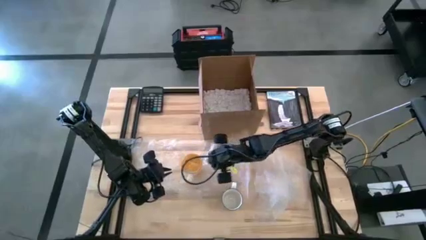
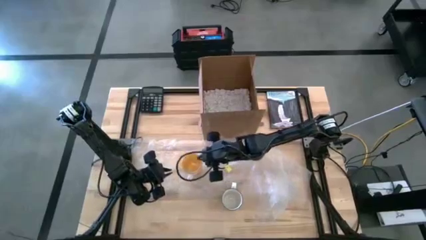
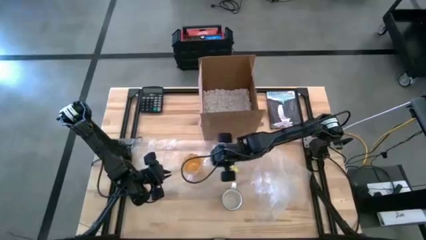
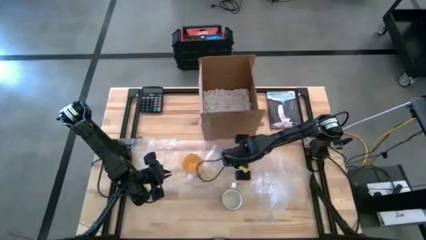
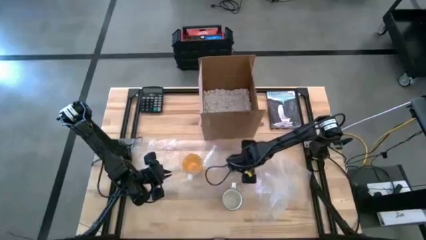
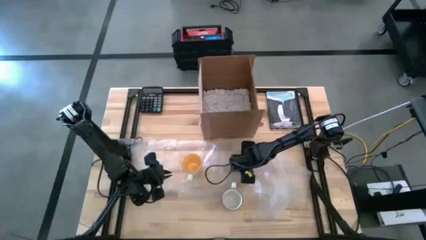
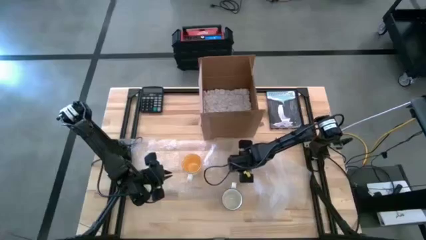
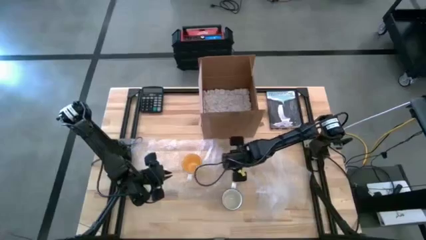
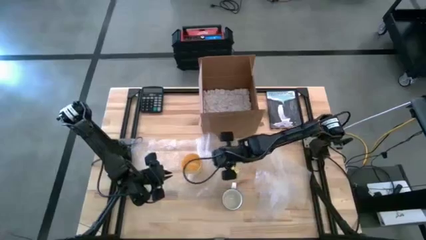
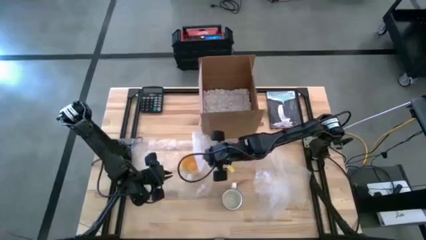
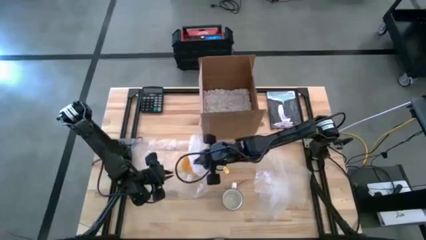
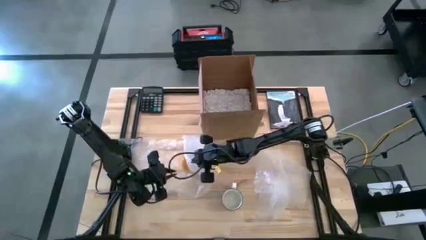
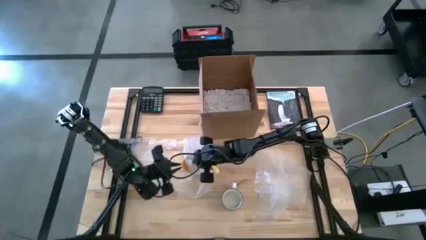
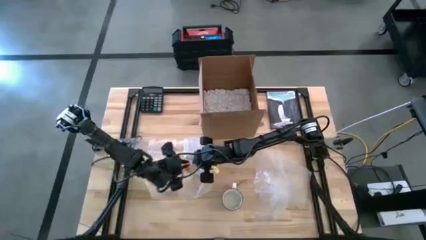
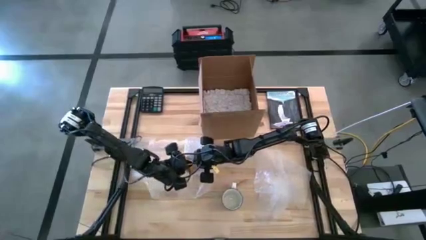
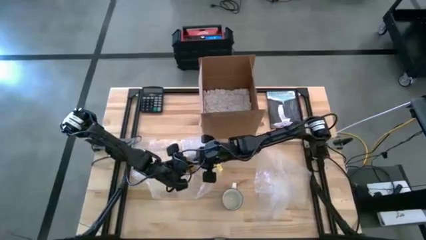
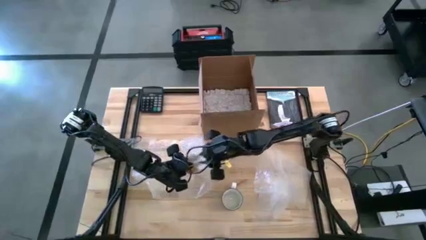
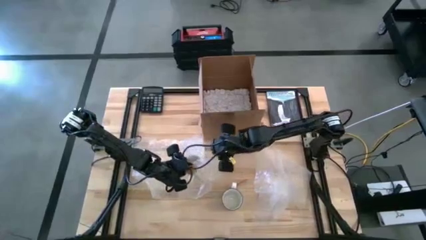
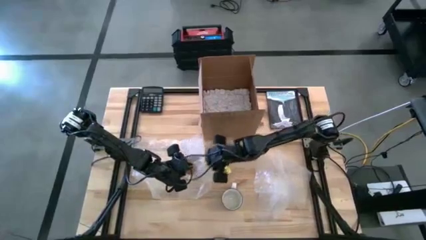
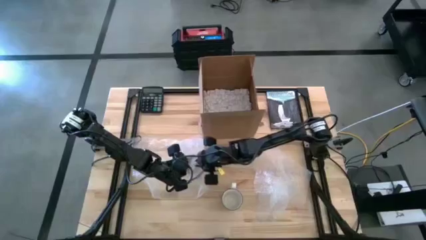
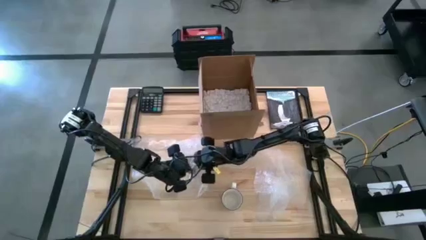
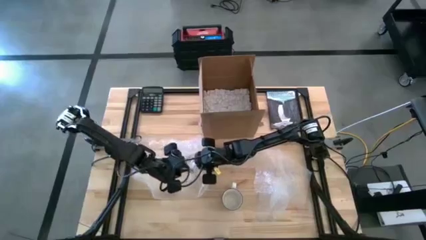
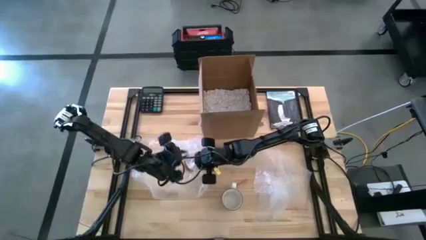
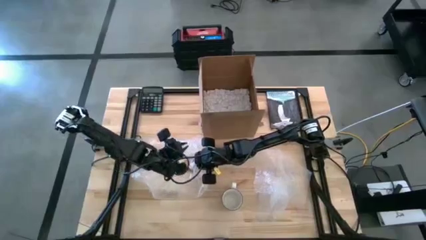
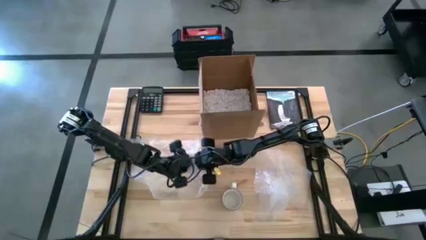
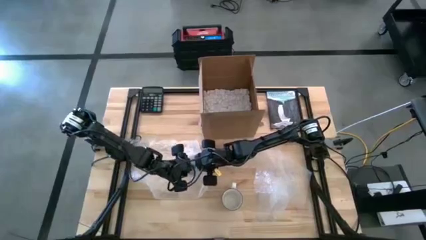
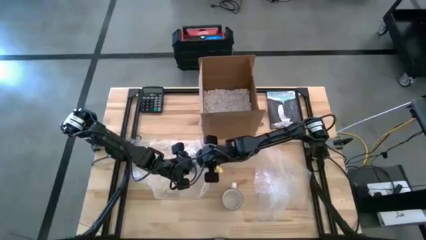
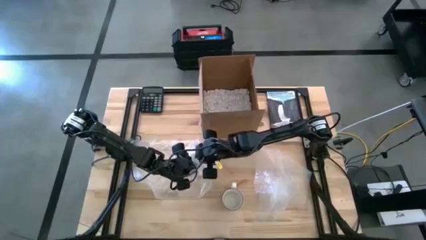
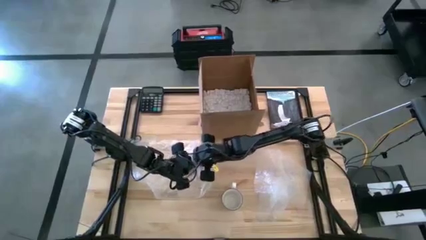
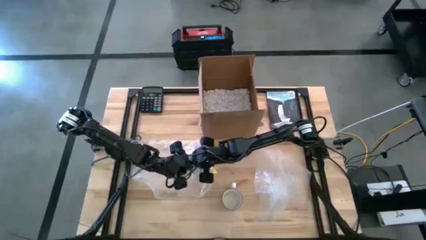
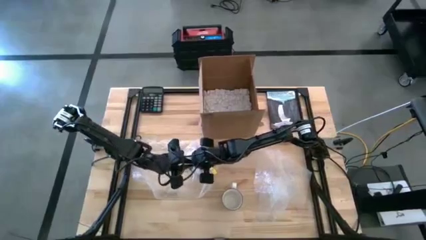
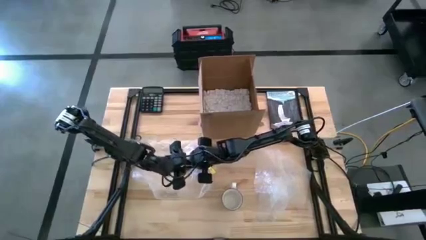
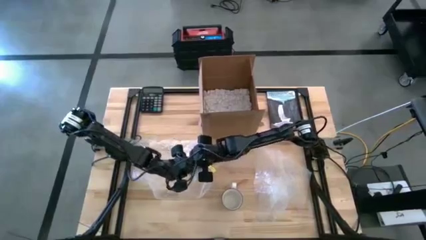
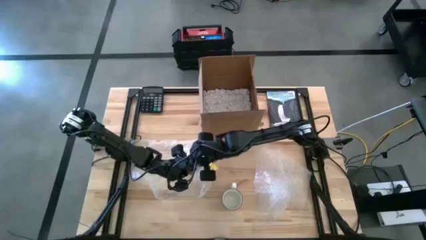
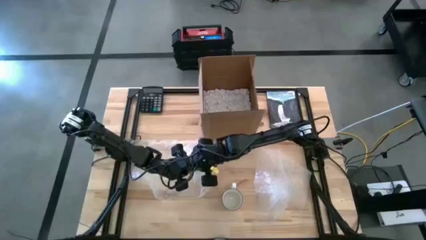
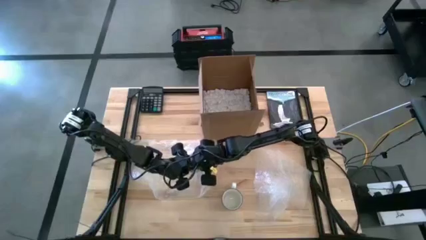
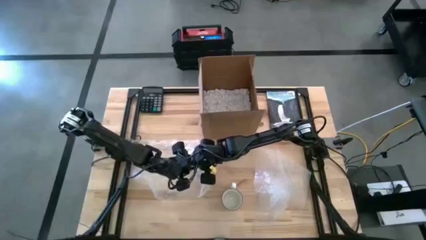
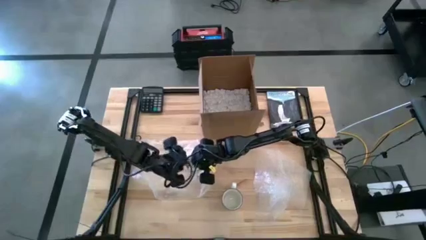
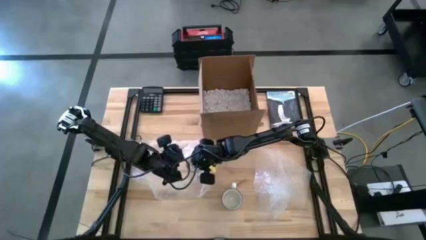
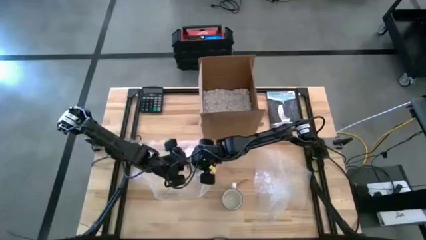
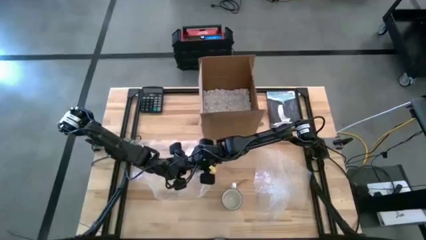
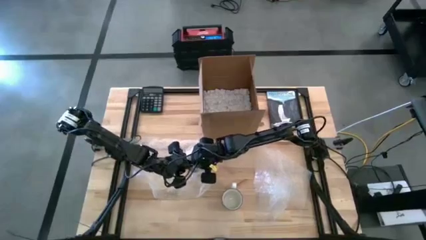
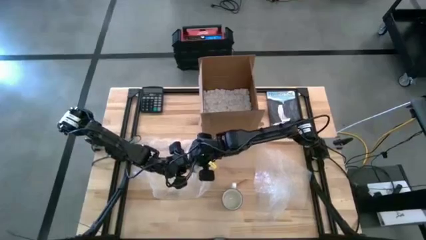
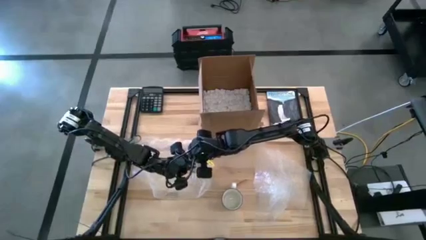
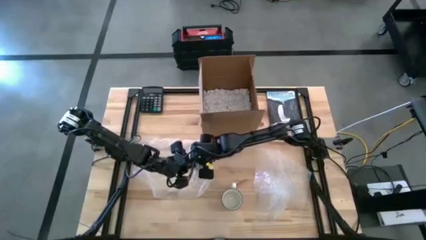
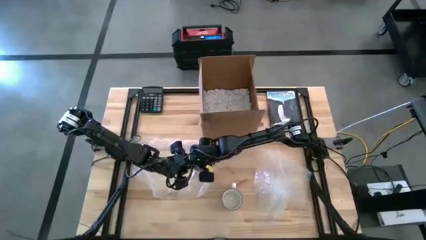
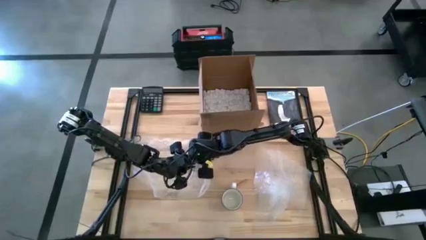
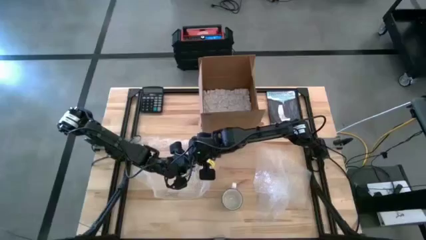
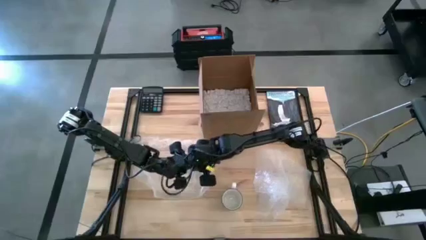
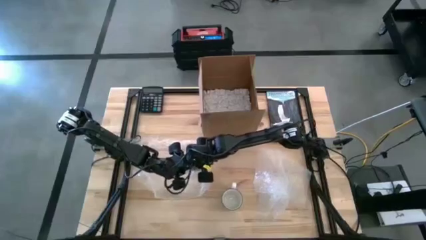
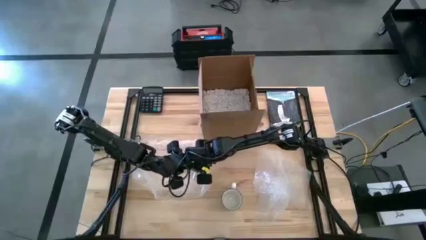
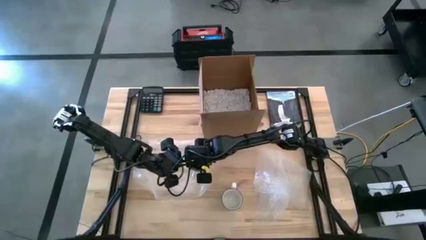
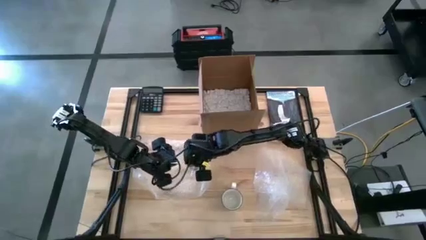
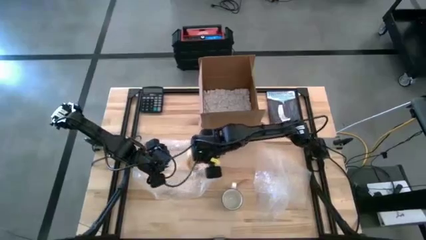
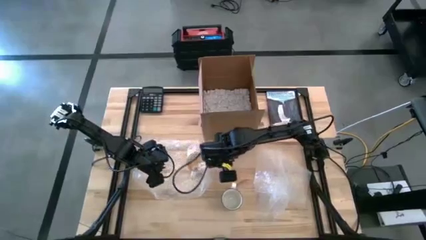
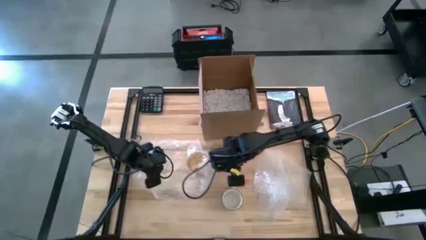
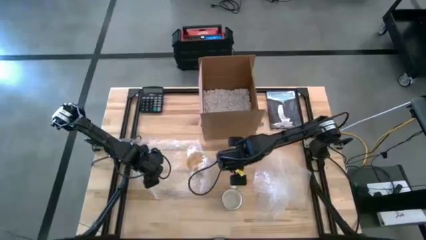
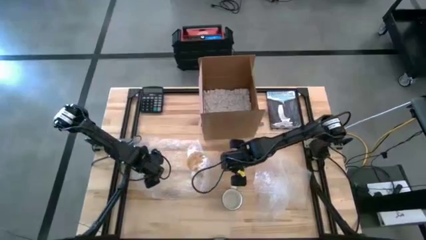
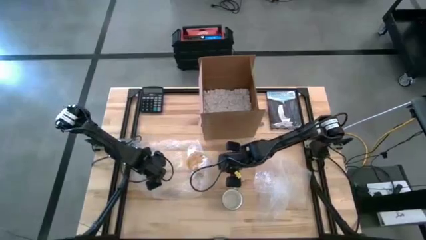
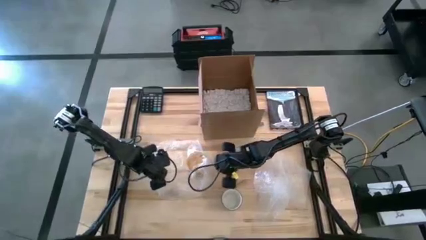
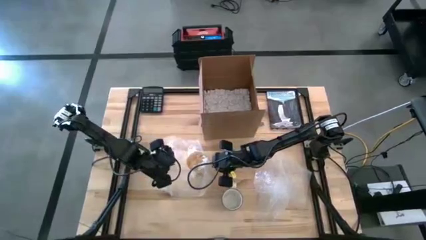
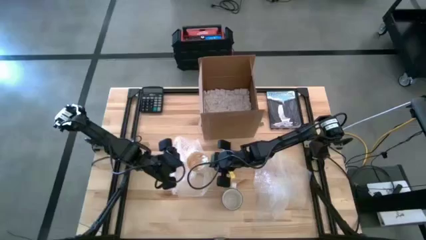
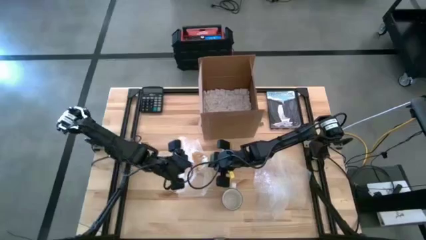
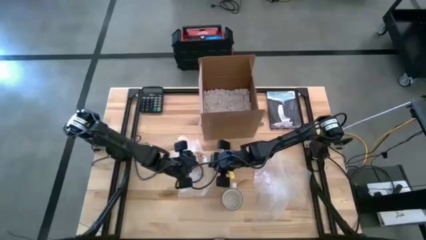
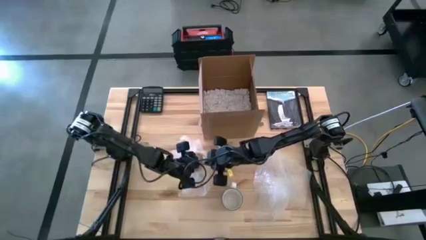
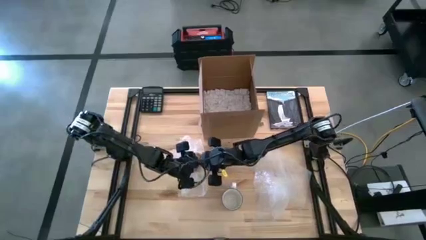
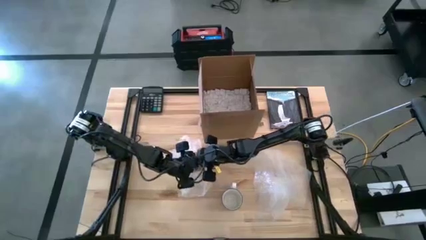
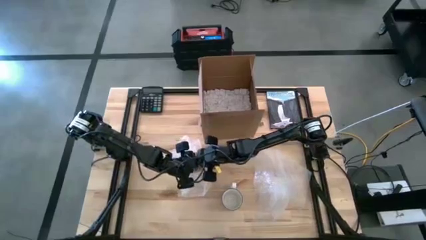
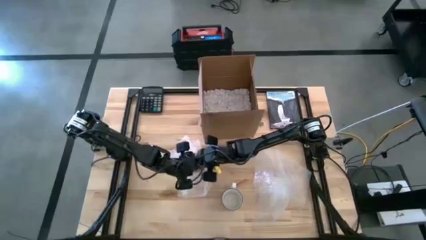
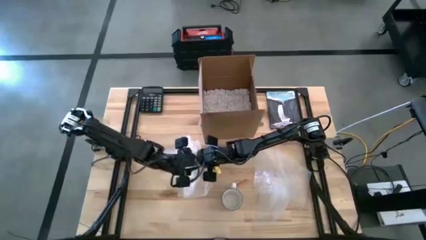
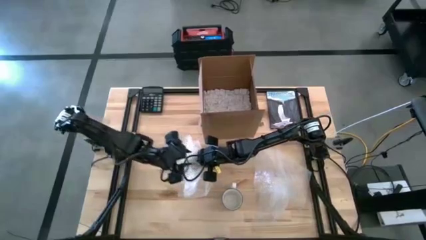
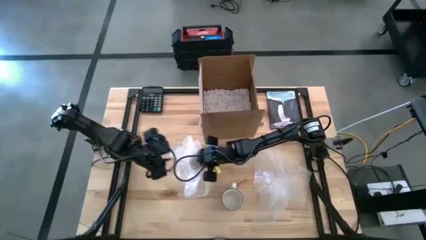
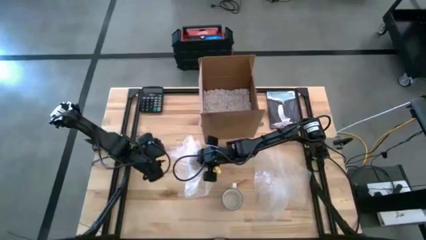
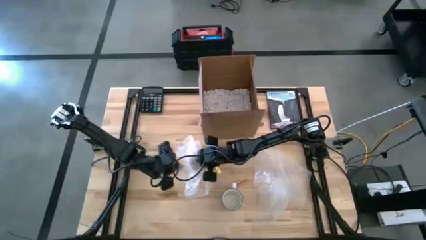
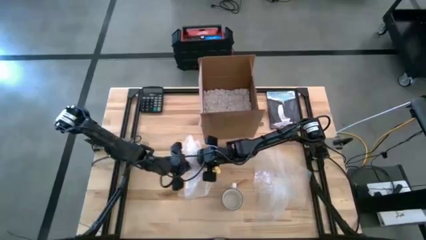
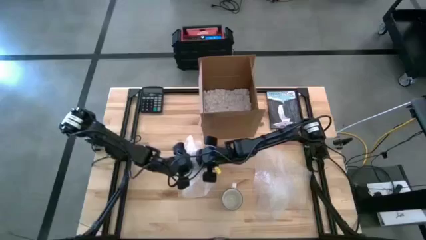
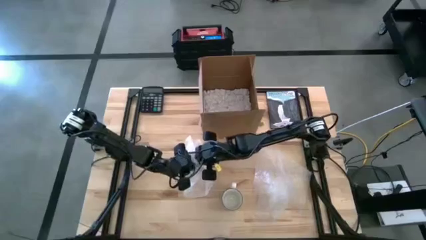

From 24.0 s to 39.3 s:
Task: wrap mug
Wrap the yellow mug in bubble wrap

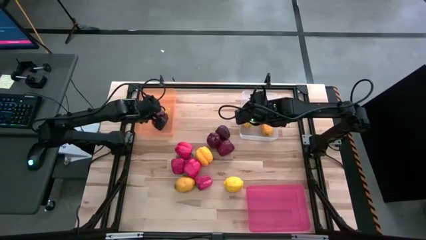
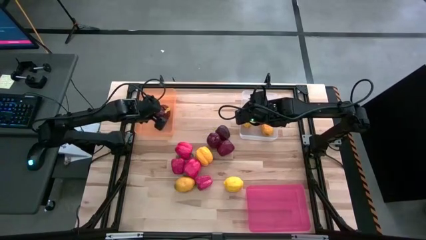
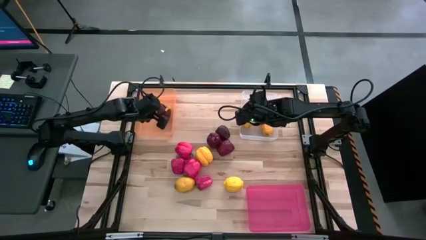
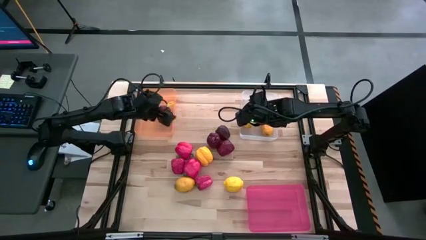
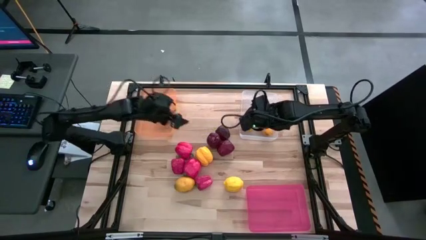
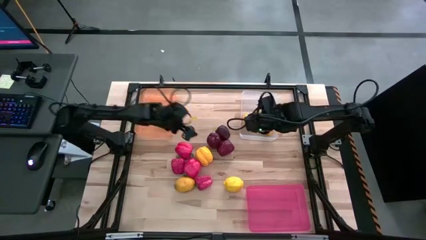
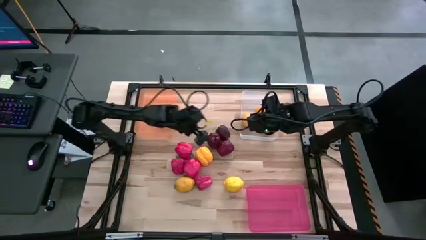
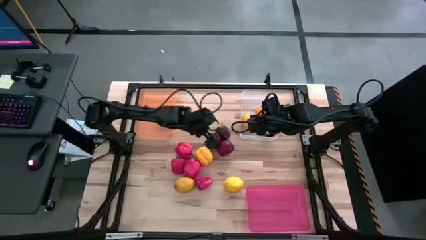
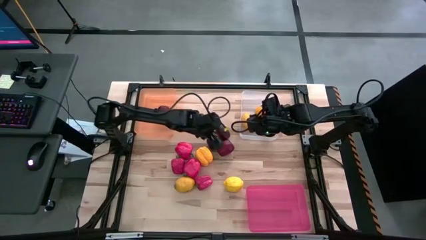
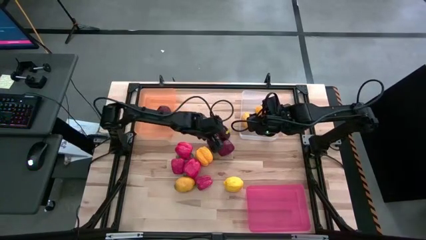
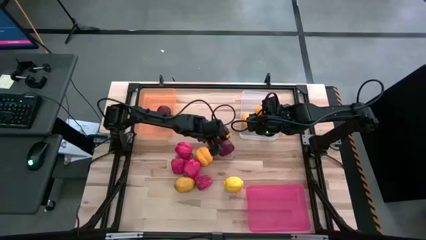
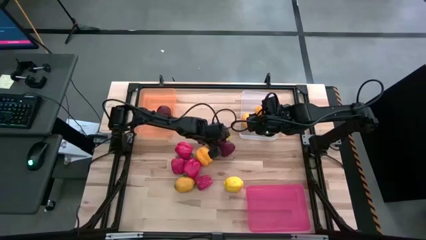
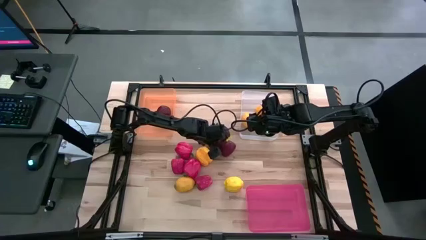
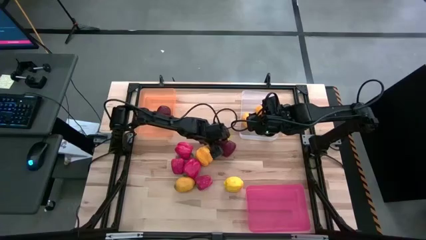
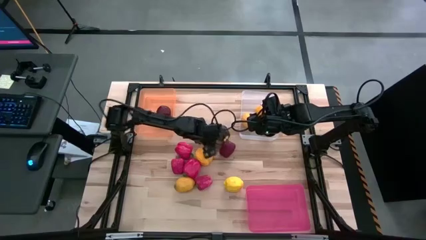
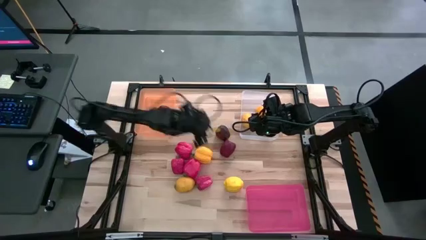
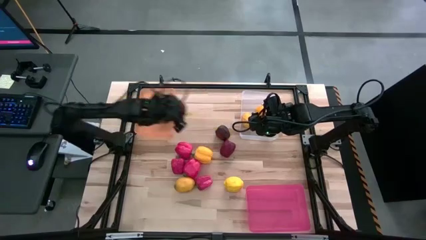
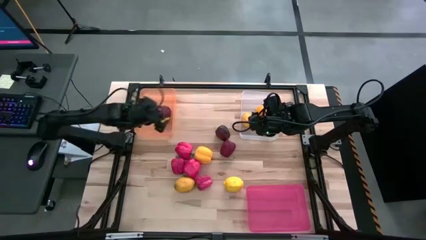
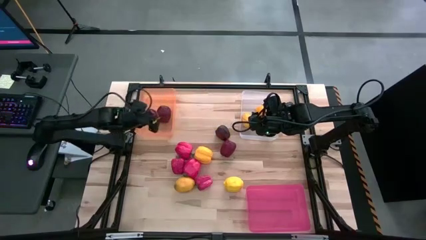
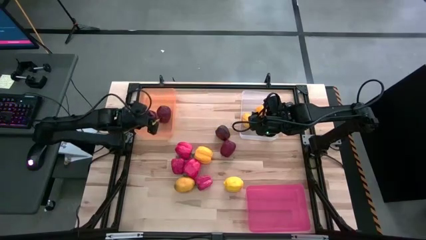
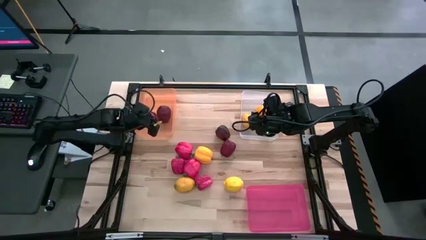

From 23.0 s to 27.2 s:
Task: Sort produce into baskets
Put the apple into the orange bin
